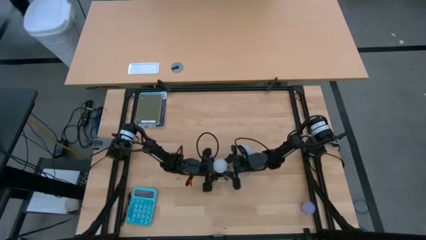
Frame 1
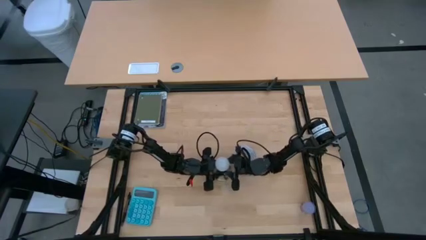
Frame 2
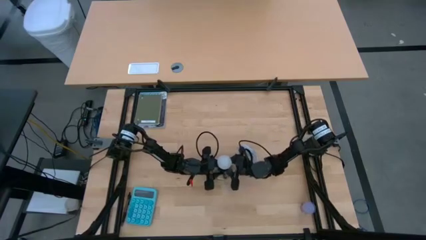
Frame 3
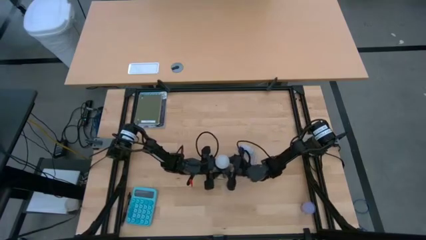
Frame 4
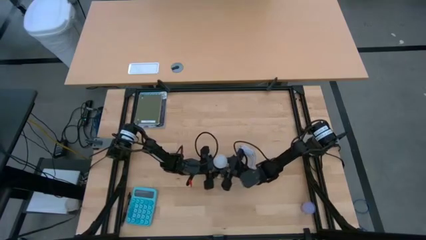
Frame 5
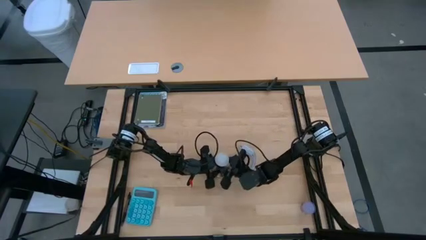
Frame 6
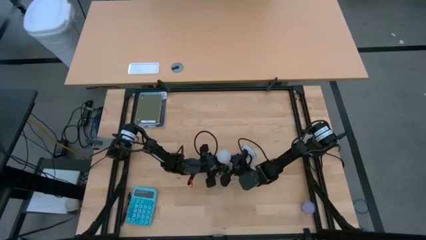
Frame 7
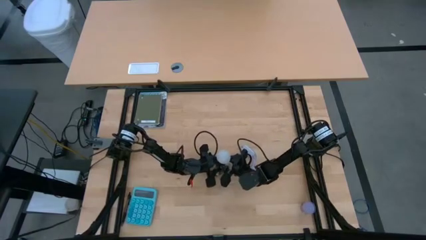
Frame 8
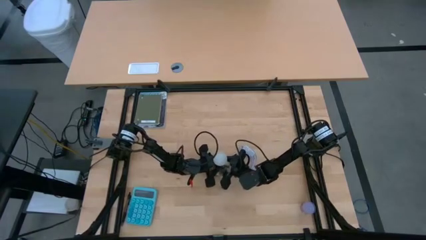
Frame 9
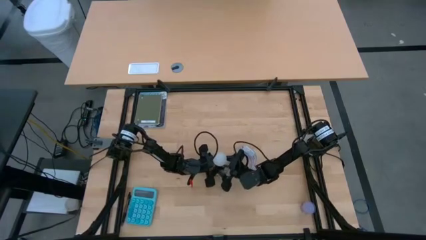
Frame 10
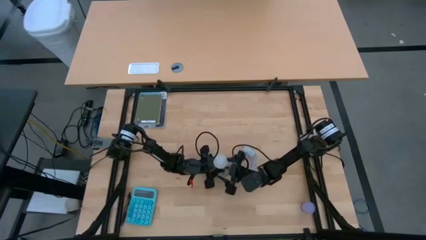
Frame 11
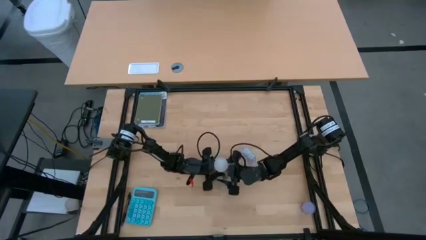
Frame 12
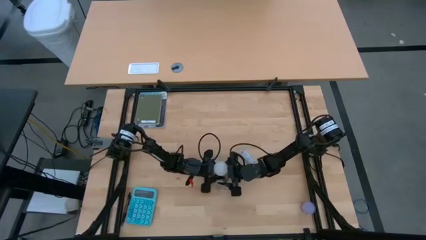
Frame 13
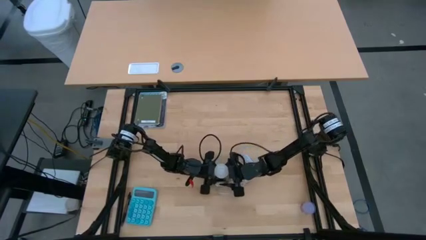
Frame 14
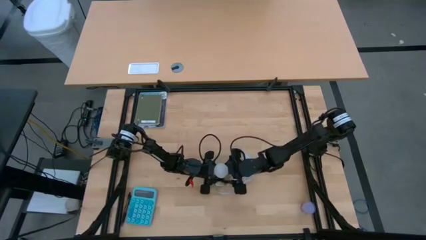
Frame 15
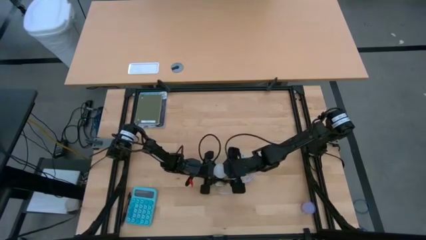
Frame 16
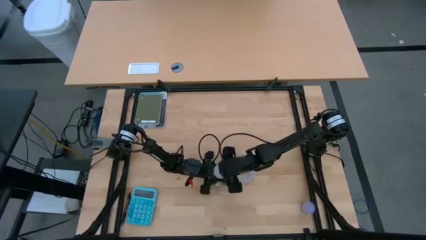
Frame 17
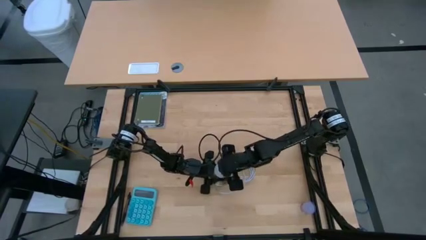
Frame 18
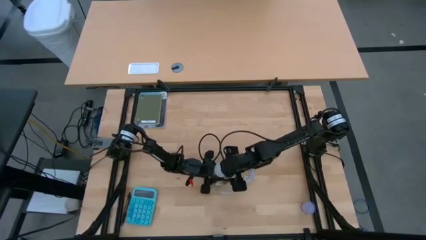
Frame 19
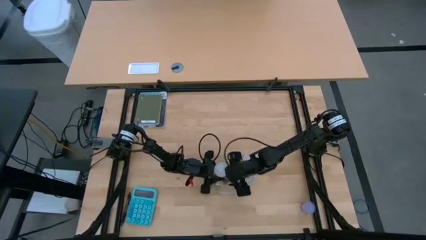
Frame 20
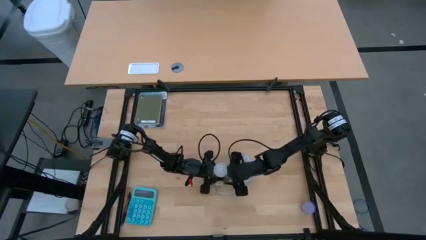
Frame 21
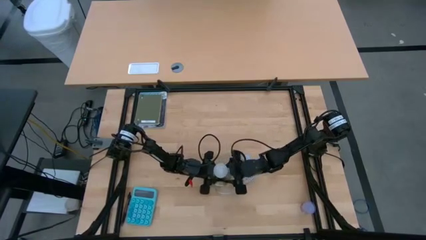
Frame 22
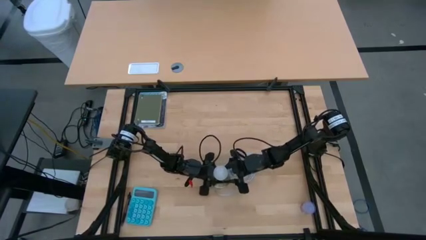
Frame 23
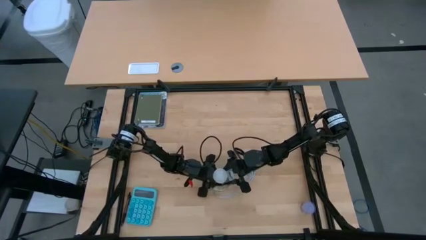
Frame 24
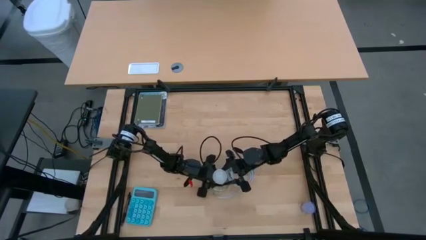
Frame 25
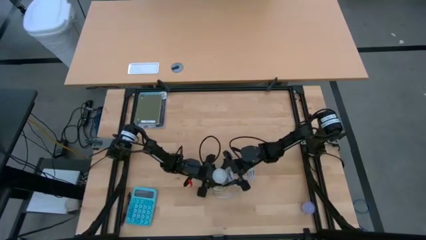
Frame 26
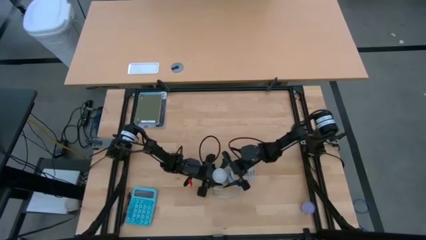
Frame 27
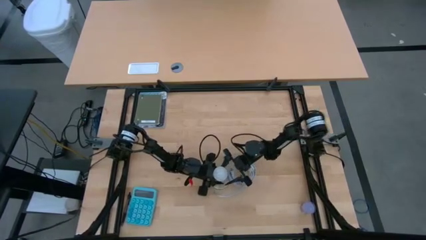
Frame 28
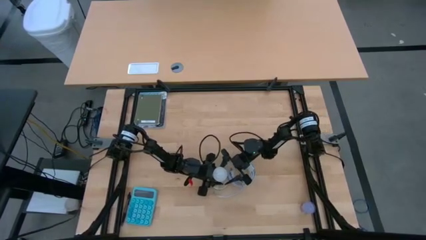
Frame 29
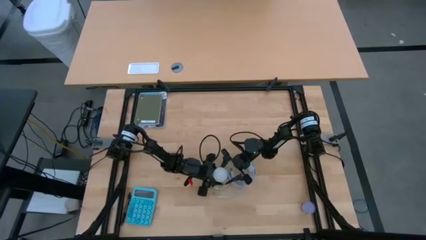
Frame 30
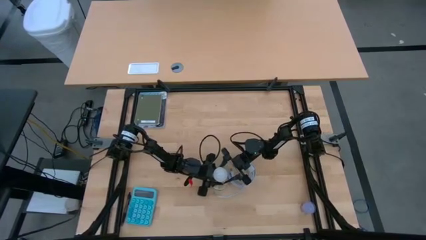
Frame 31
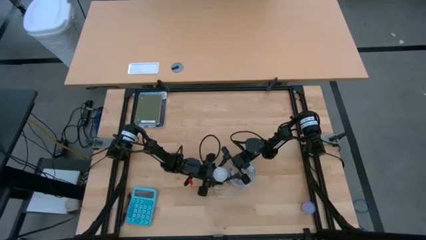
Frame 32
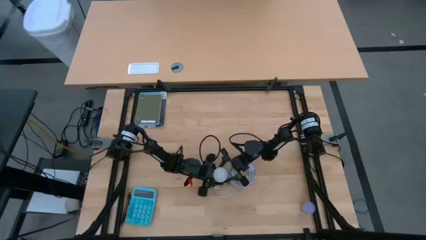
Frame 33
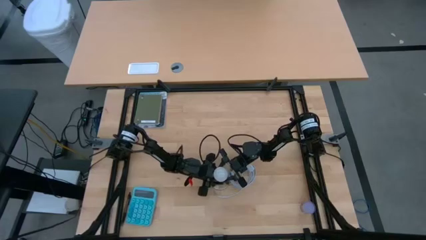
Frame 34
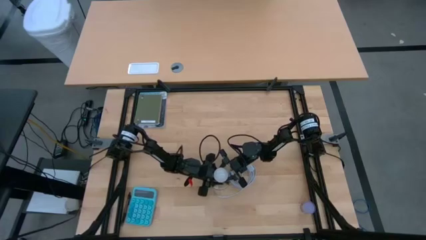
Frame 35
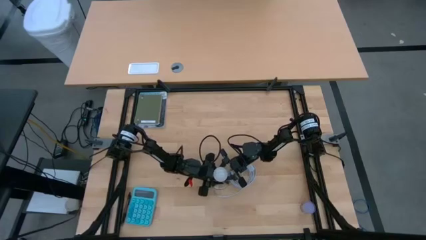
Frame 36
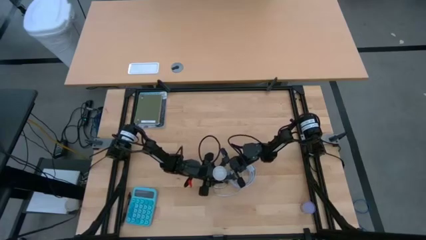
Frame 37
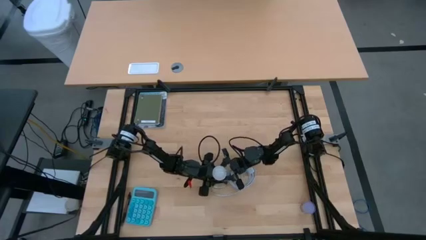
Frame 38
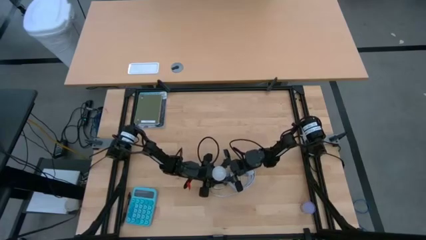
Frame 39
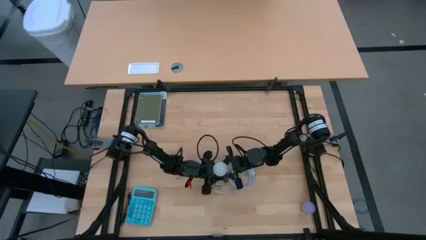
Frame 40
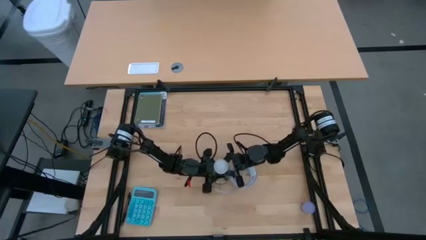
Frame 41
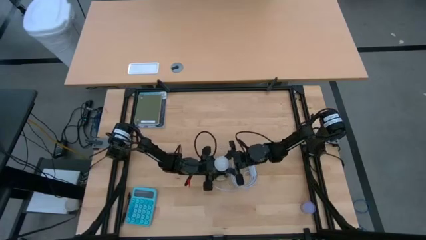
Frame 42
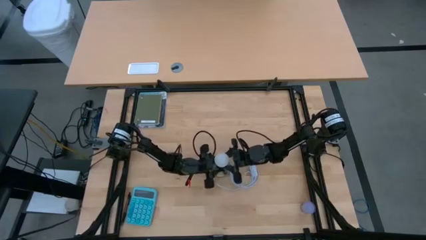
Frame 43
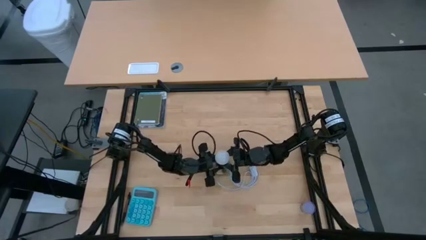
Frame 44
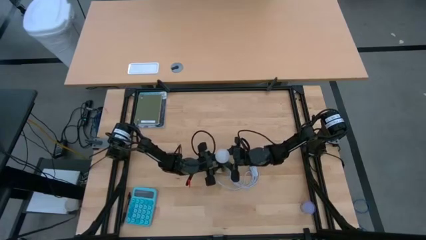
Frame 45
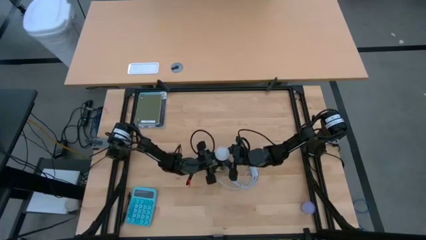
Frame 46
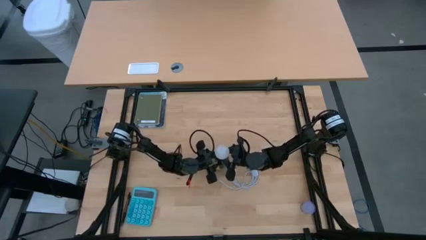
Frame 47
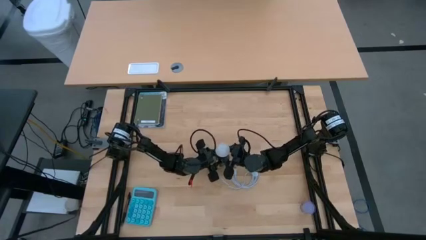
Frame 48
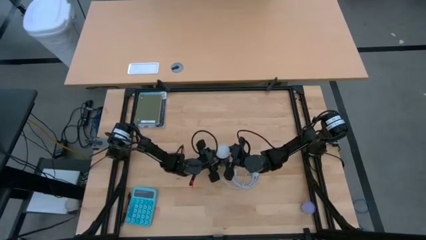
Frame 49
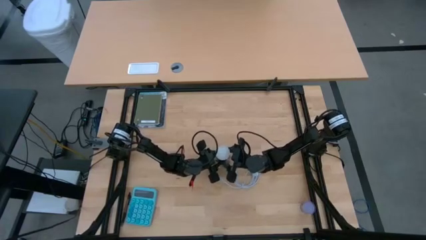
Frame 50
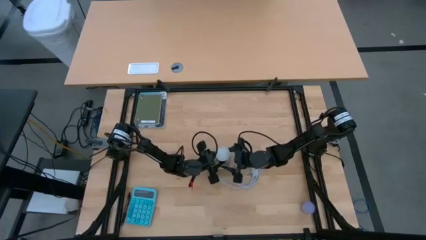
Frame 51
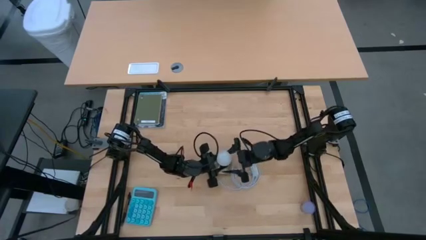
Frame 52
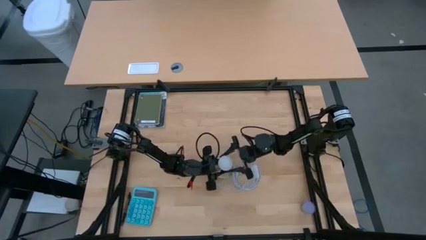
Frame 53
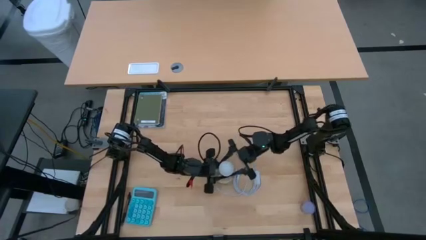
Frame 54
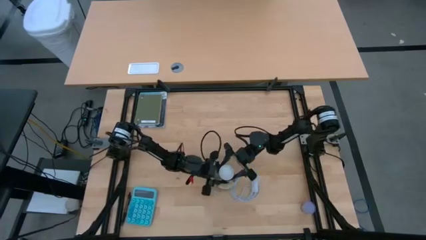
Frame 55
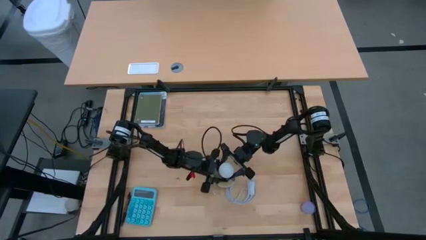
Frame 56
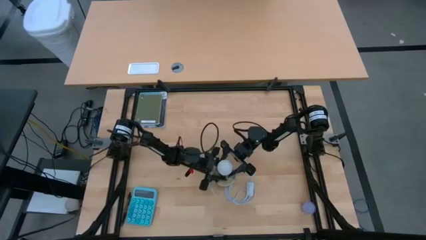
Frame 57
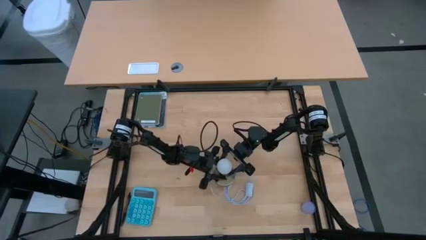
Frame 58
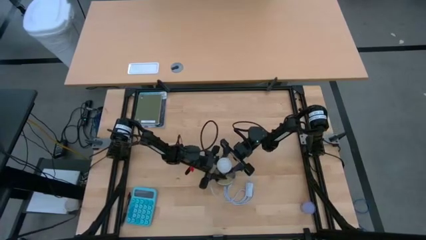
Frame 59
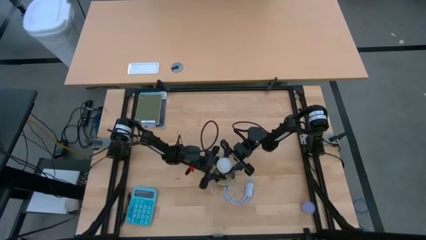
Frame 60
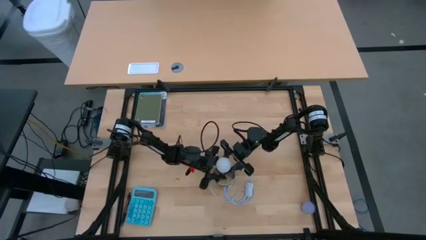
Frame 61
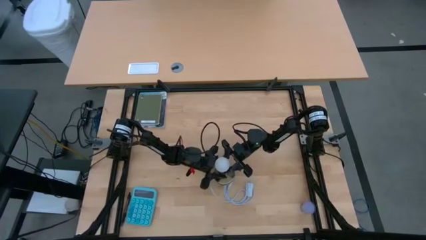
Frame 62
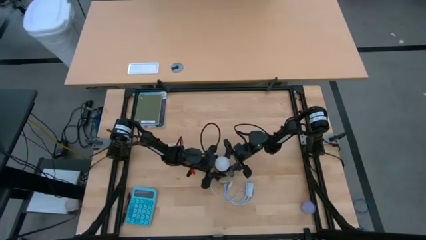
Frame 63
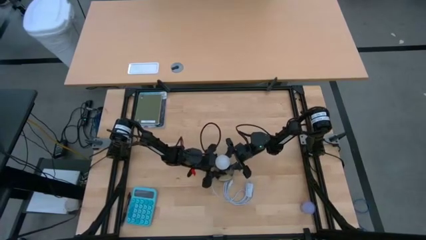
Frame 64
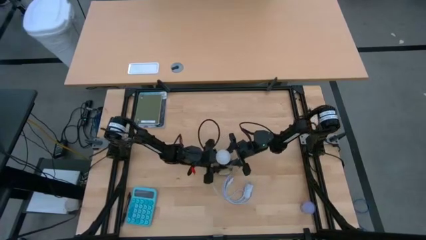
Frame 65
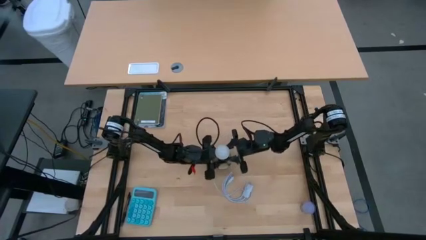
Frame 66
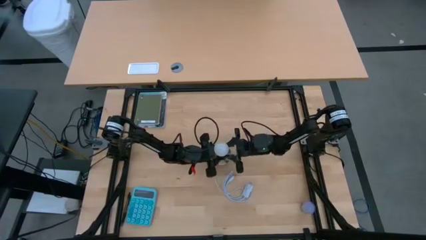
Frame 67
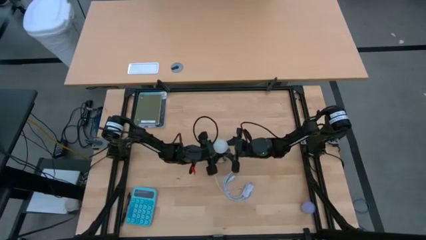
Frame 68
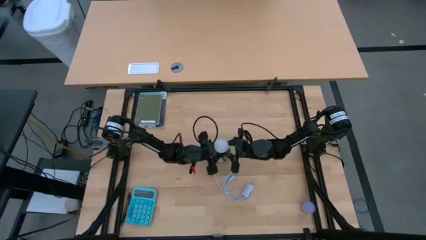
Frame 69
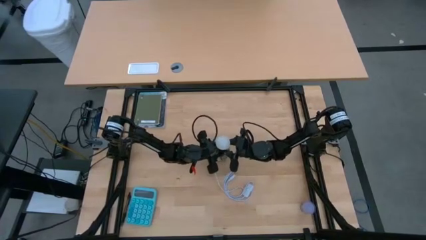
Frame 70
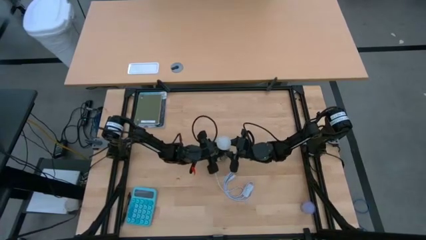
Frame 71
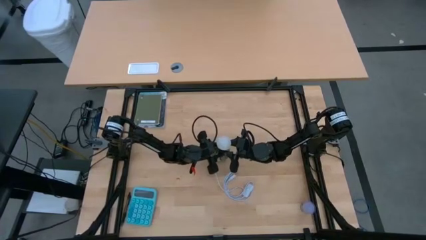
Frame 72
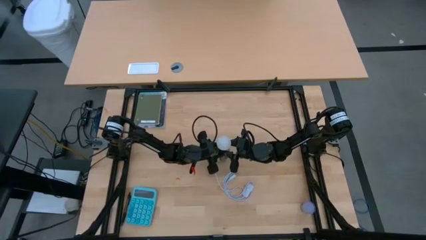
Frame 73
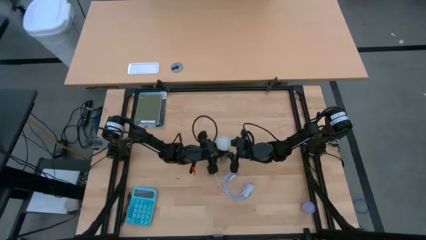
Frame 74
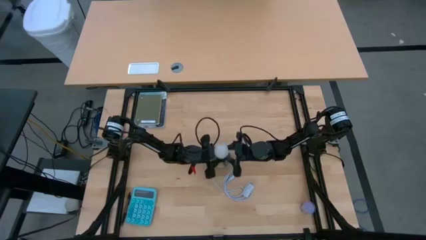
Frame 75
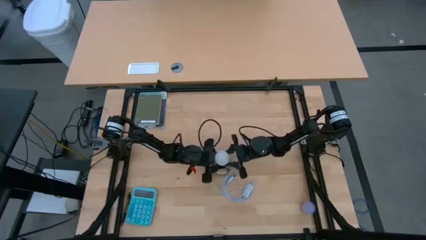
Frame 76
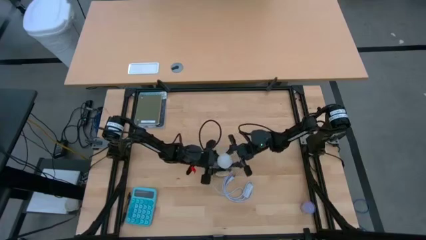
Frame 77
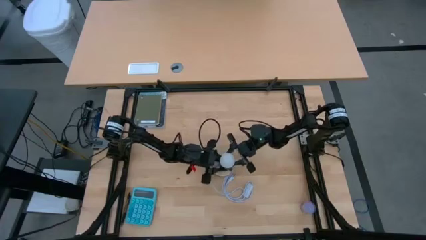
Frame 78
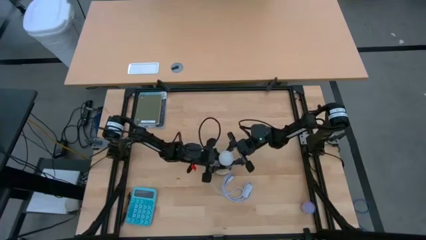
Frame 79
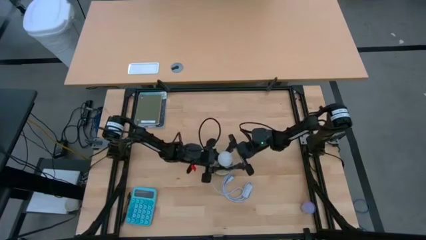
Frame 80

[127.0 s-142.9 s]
Task: Screw lightbulb
Remove the lightbulb from the lamp
